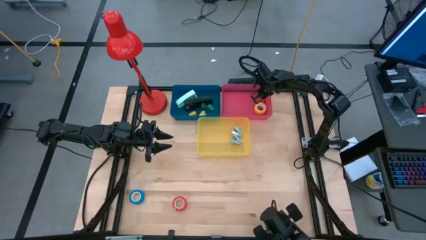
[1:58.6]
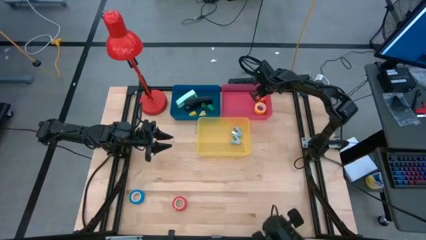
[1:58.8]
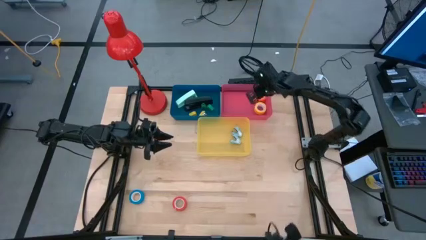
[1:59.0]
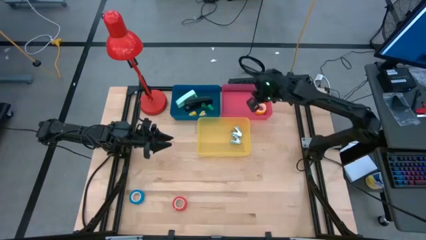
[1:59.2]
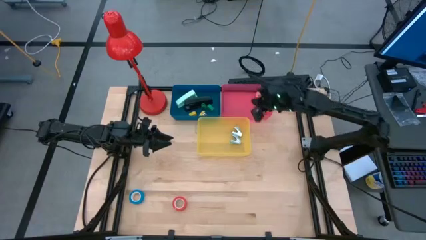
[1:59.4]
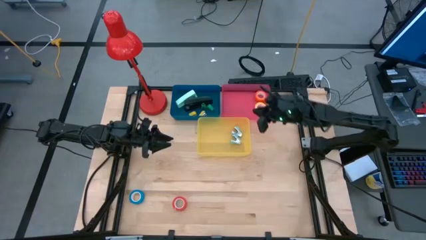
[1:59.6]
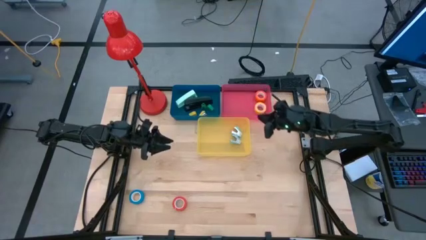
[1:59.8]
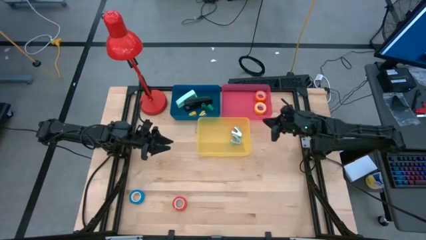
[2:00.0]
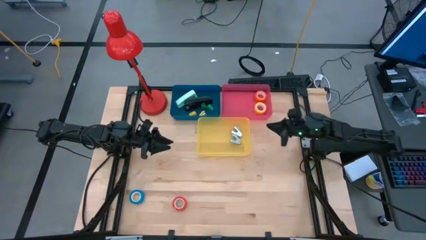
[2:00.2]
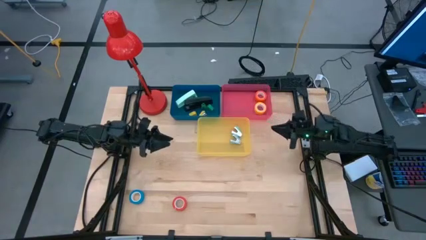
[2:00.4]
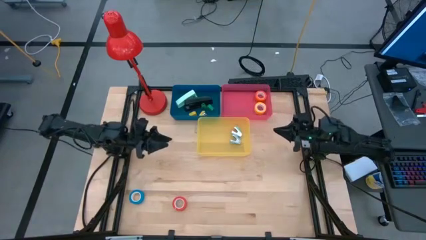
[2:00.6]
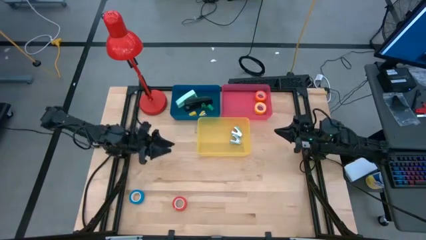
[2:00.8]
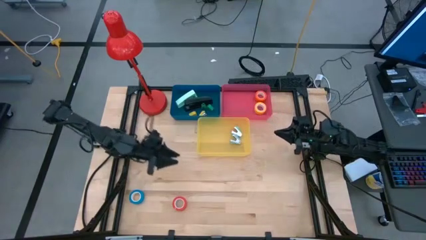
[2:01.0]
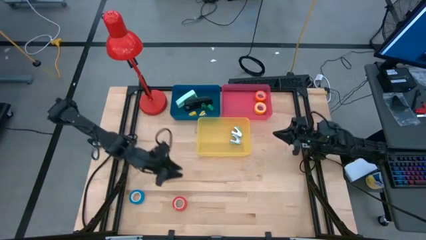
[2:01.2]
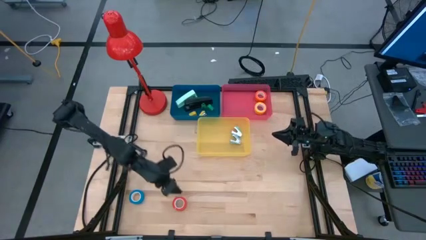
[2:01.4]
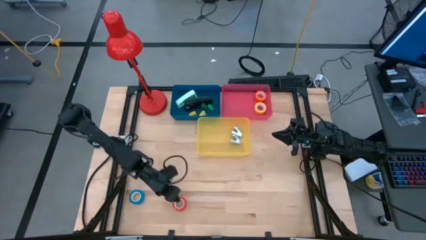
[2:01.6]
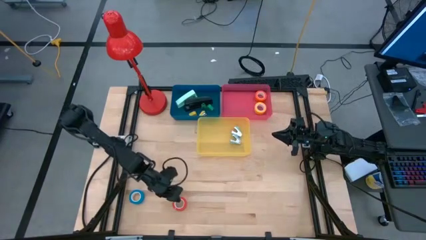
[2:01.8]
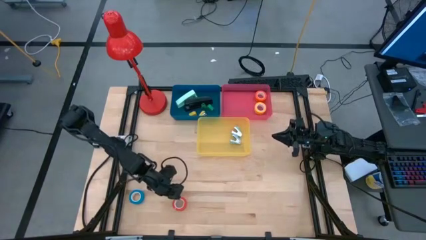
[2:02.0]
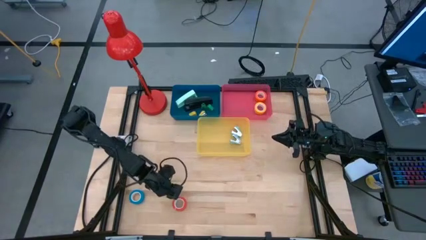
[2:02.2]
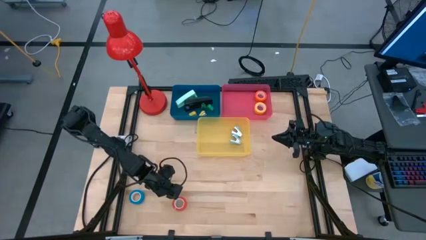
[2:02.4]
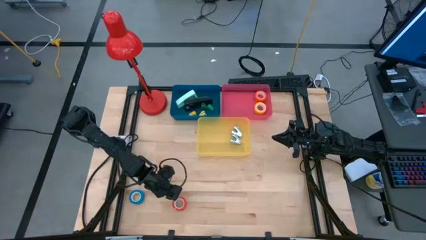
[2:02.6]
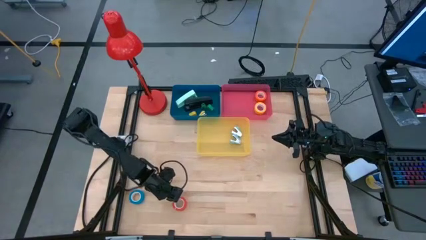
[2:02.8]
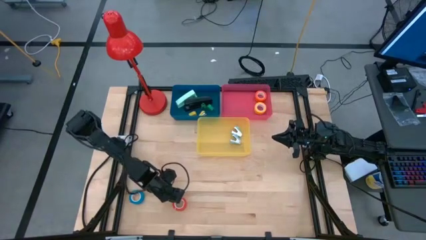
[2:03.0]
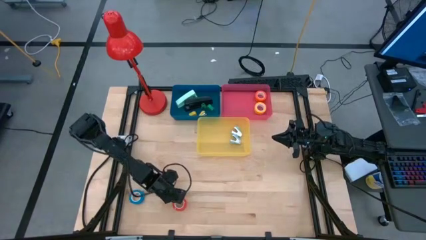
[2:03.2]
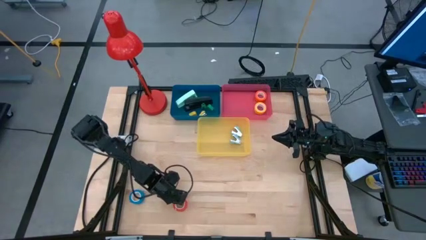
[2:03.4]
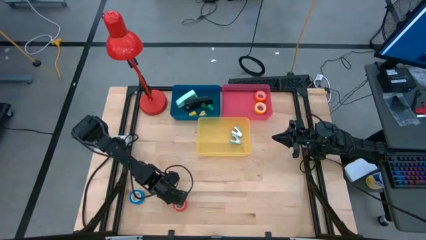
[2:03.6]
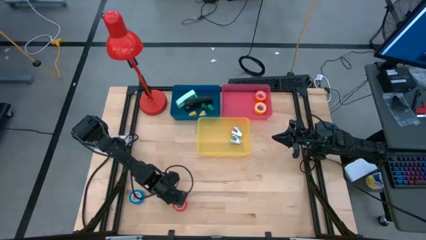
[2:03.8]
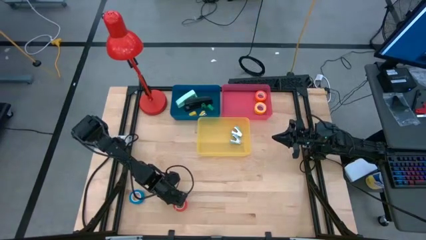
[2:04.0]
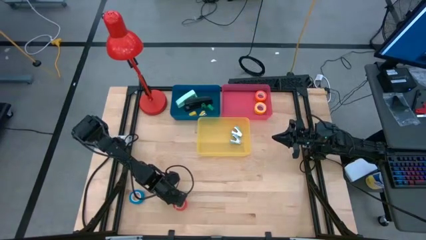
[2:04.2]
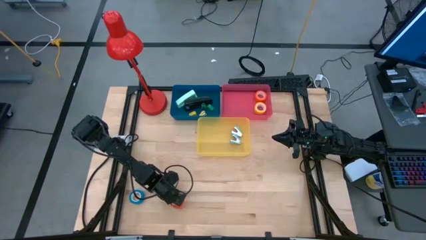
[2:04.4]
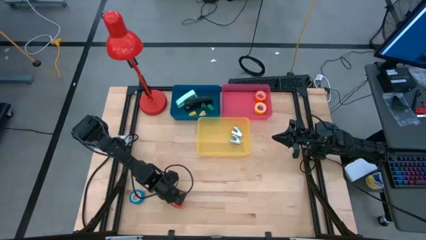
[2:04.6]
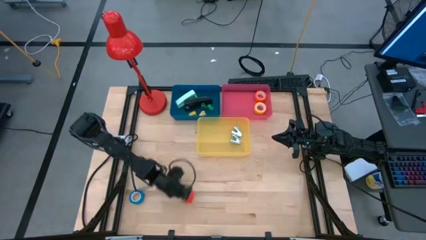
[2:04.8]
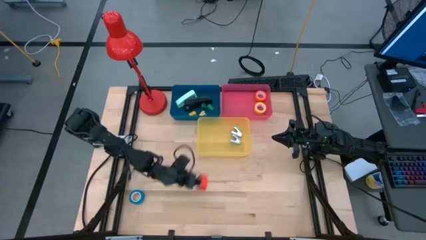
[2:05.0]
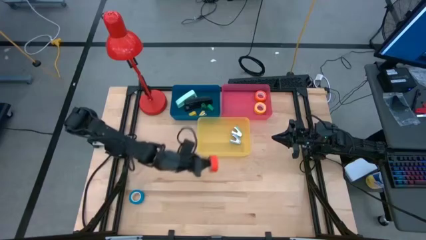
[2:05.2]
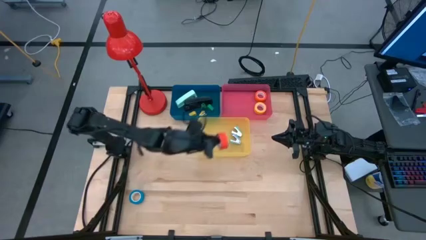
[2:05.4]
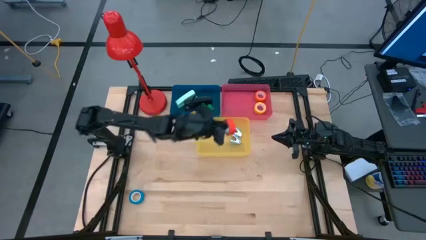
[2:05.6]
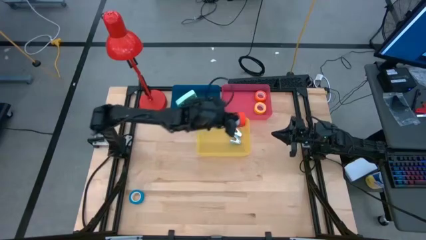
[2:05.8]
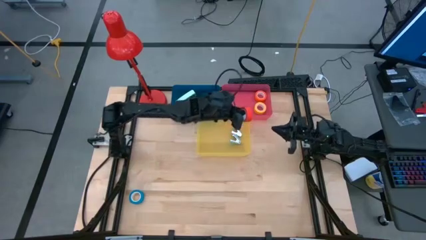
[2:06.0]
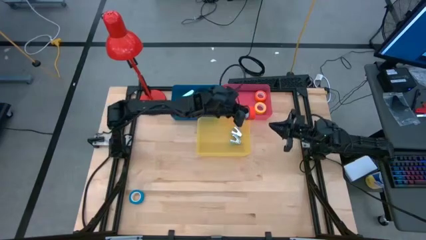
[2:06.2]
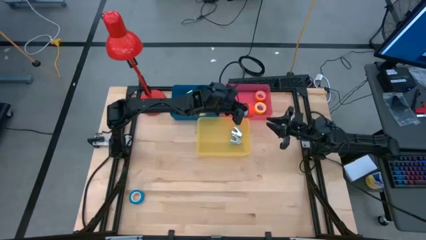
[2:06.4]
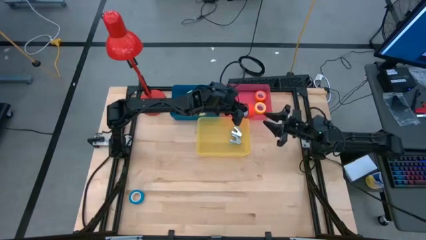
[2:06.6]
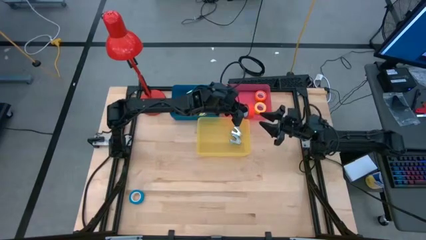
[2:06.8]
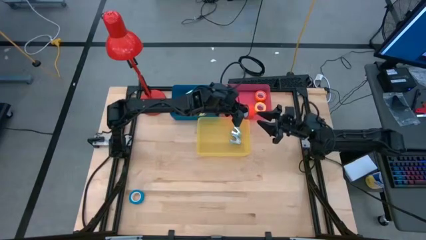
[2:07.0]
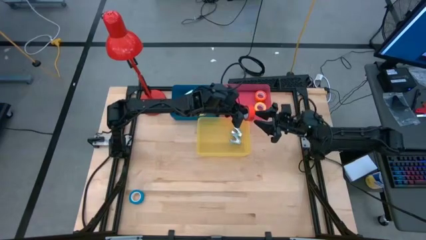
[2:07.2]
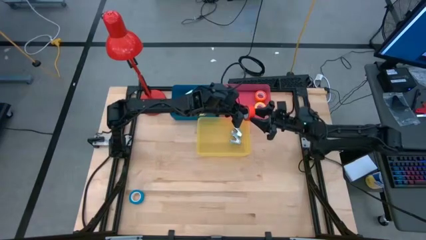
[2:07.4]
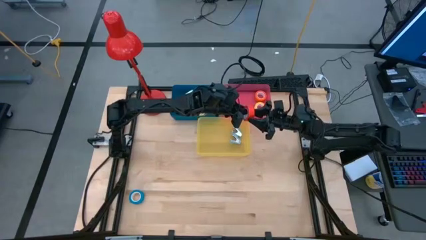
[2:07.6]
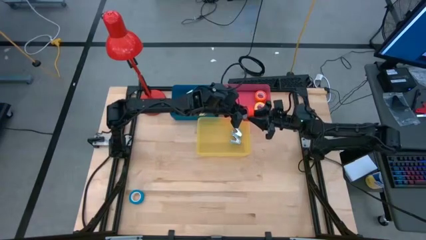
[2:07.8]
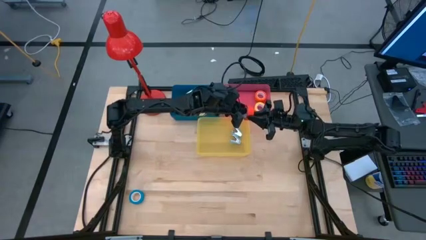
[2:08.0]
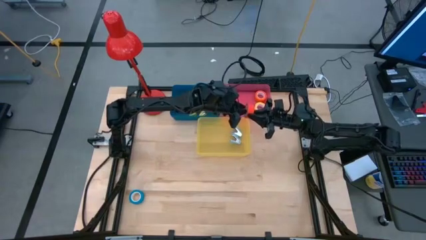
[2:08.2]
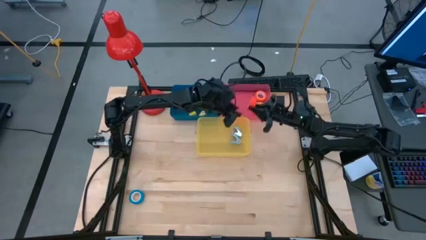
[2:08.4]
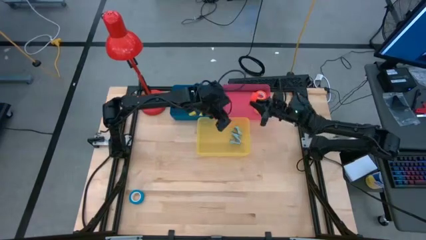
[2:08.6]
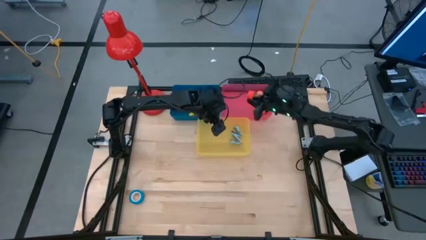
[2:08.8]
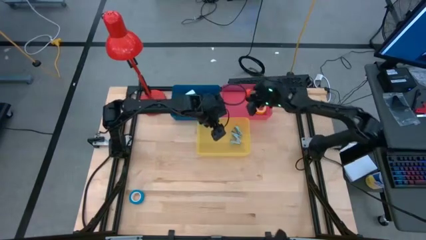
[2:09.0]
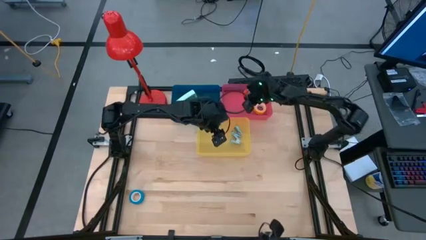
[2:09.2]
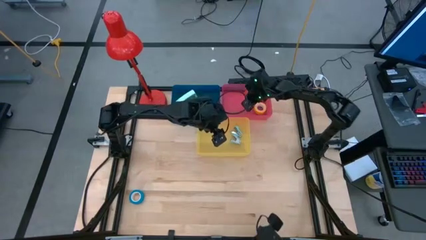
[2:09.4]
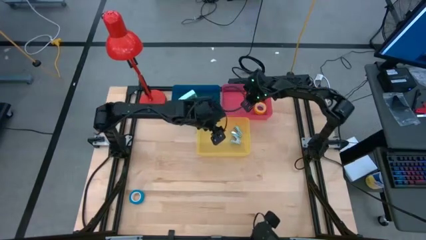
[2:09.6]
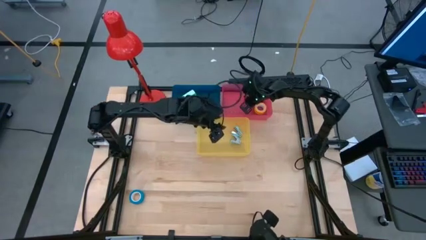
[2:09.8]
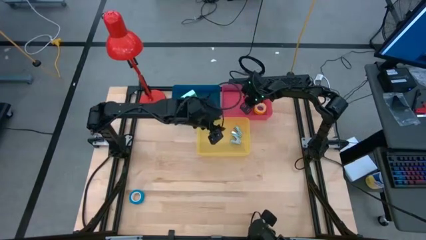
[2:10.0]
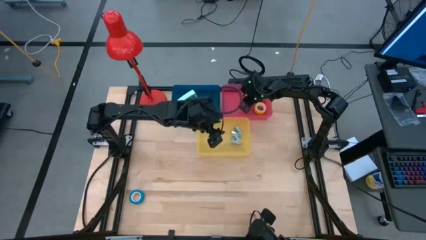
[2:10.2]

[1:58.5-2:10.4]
Task: Pick and place Stapler, Stapler remover, tape
Put the red tape into the red bin

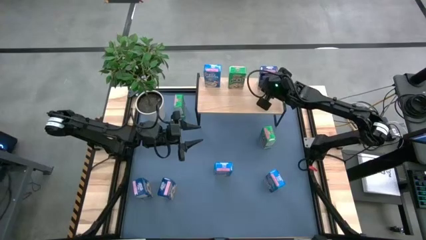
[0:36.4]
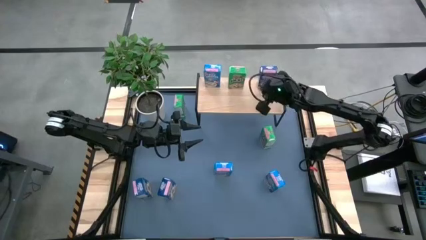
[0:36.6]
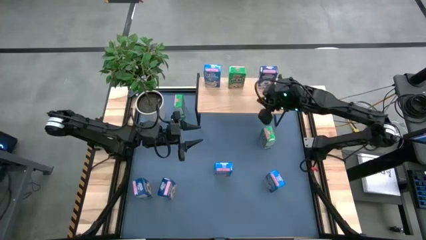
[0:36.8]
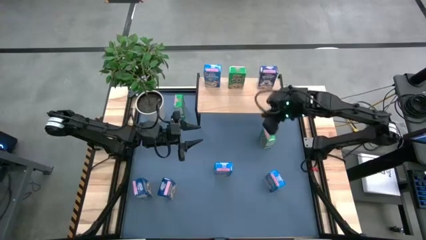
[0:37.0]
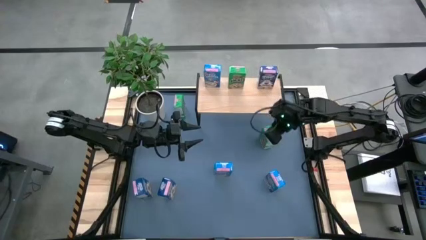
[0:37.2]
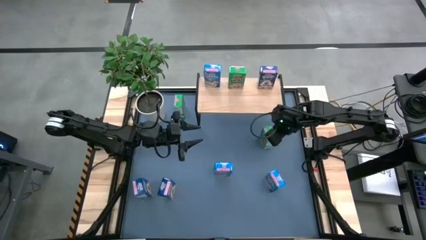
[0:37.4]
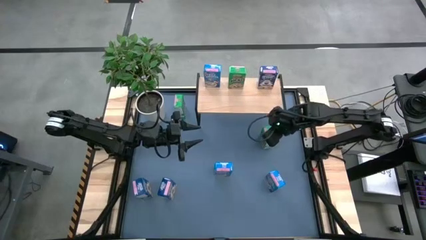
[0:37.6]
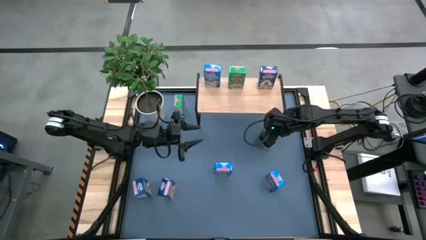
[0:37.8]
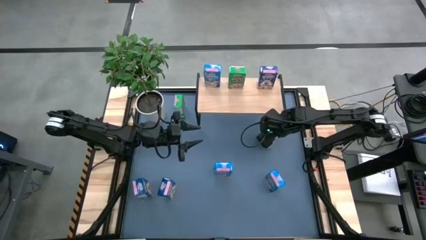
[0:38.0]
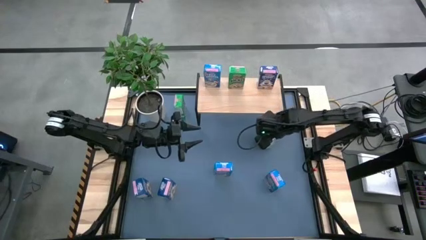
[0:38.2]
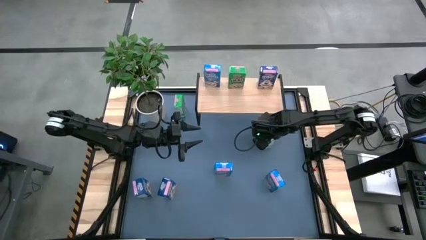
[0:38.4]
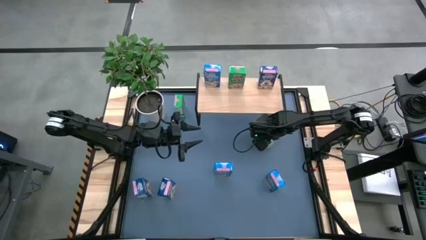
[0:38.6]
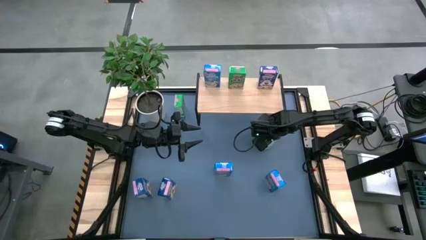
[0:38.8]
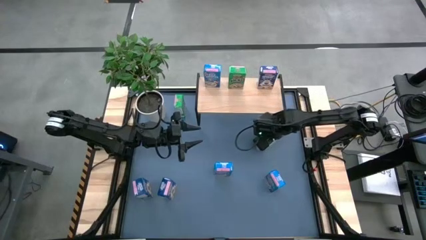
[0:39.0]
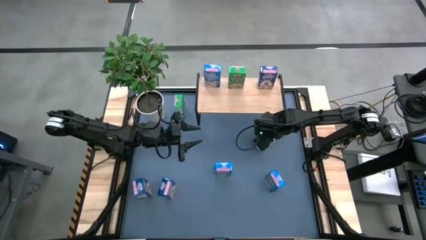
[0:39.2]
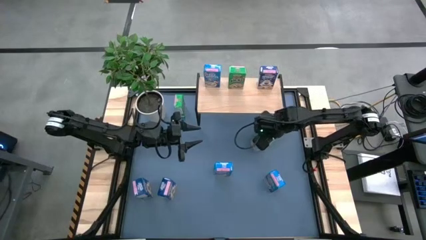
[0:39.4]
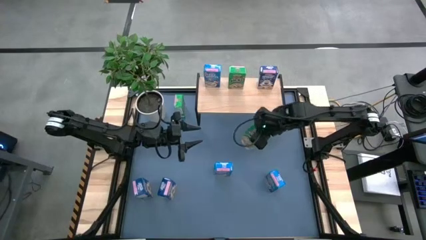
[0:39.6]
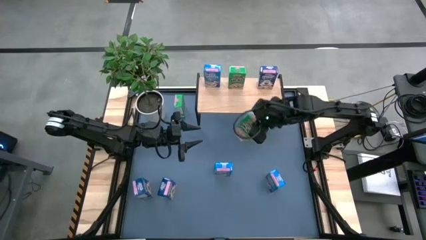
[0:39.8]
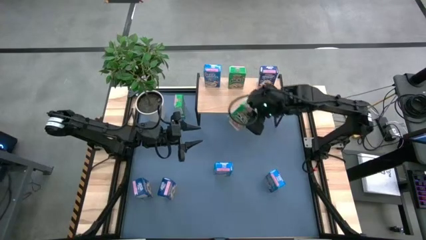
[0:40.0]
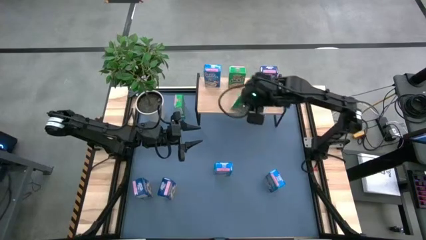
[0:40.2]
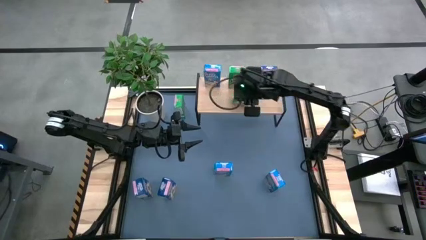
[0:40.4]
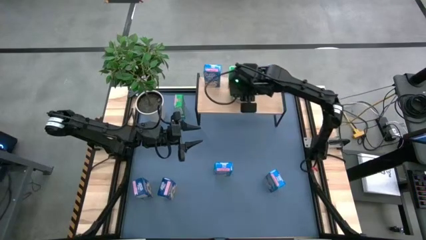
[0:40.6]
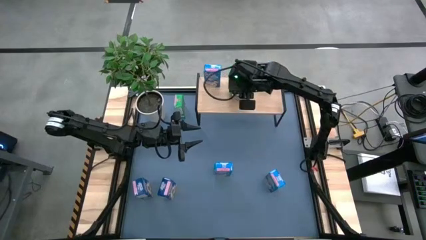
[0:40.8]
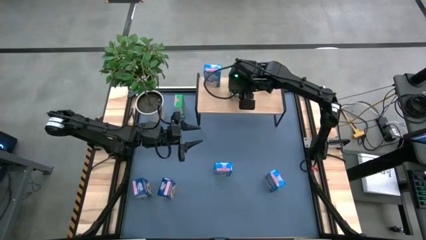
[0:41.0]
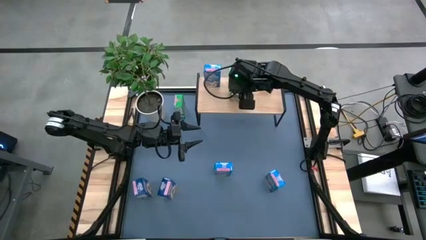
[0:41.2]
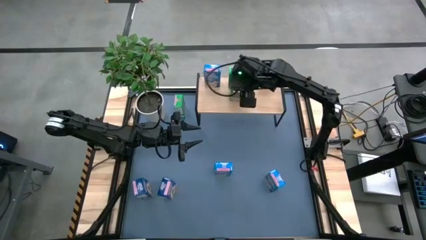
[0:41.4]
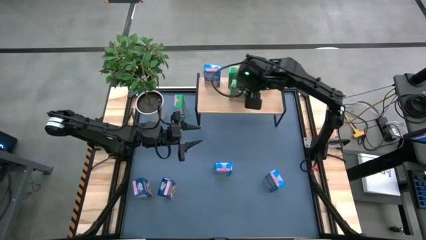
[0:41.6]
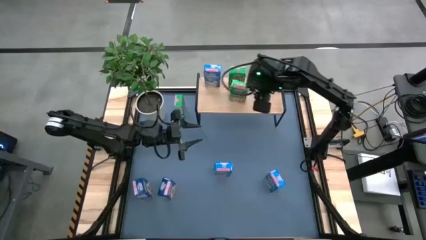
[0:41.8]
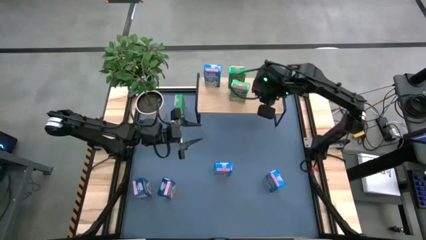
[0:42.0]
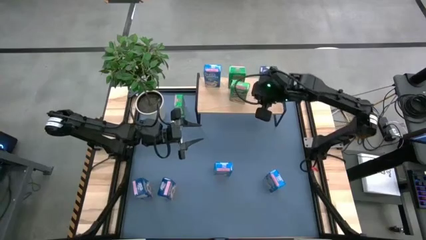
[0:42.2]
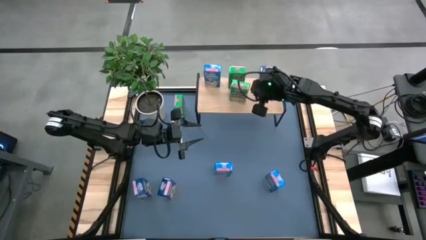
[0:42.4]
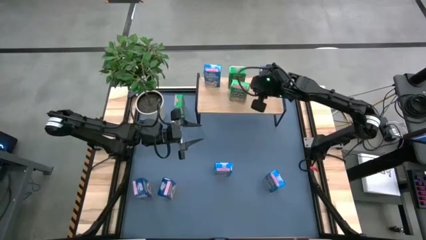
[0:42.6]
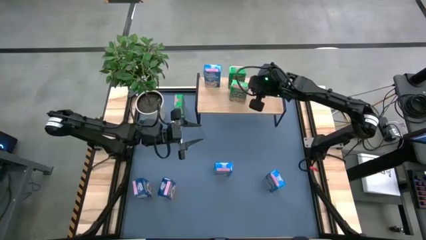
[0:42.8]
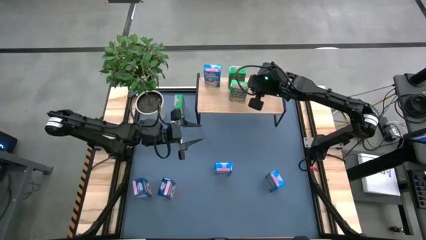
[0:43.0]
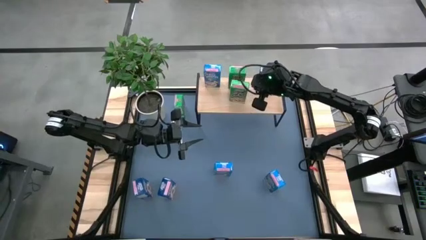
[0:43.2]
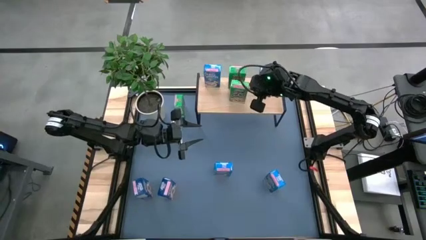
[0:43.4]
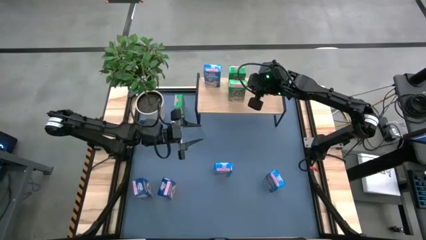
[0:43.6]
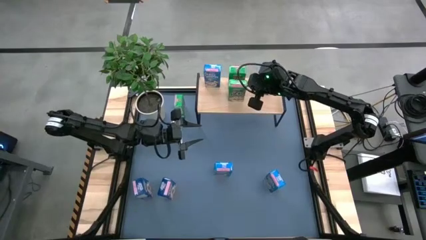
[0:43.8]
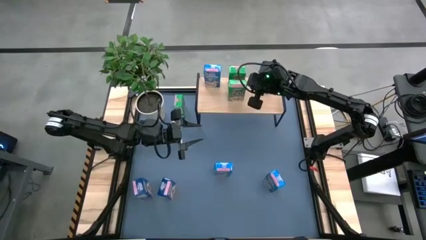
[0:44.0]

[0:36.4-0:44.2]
Task: Stack cereal on shelf
Put the bottom green cereal box on the shelf aligned with the other green cereal box
